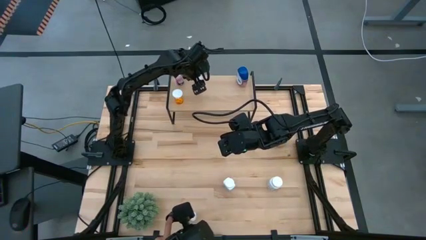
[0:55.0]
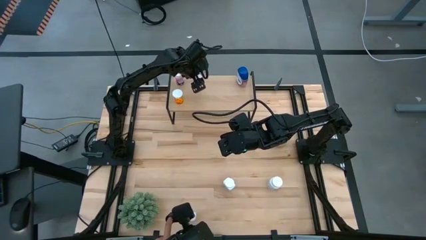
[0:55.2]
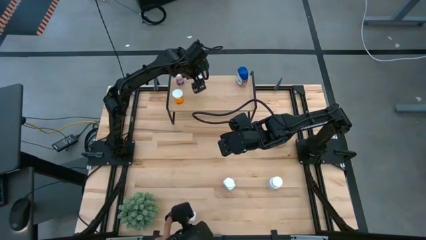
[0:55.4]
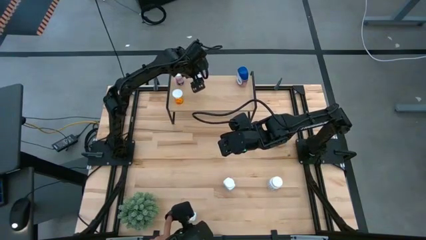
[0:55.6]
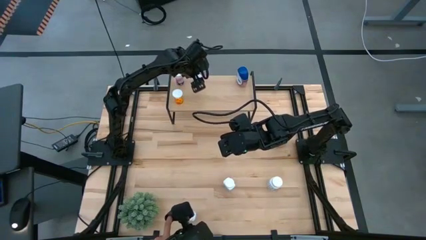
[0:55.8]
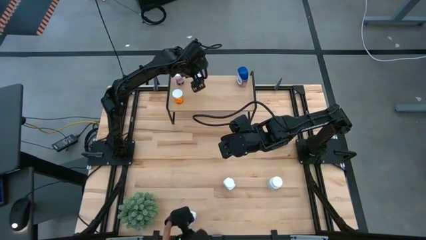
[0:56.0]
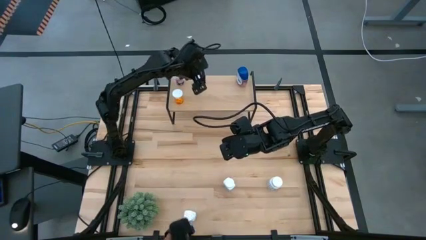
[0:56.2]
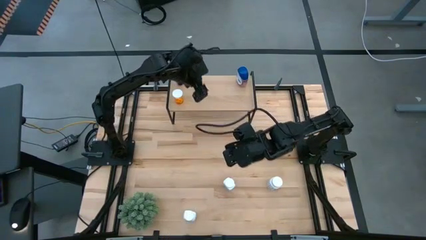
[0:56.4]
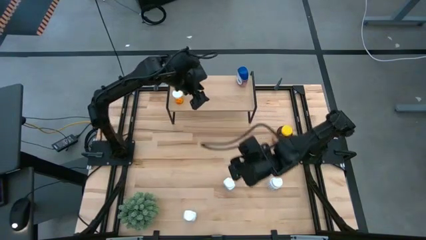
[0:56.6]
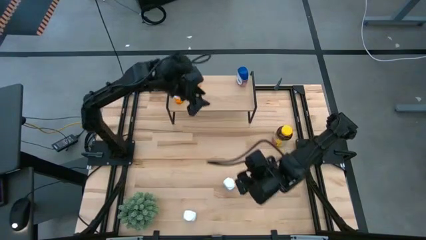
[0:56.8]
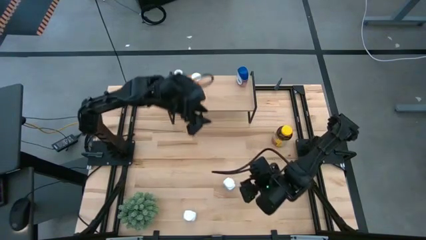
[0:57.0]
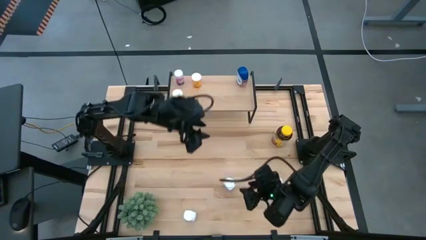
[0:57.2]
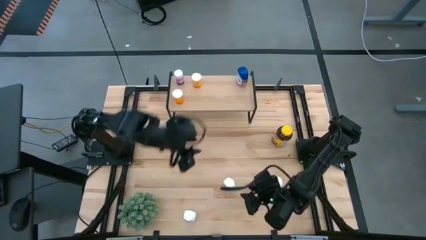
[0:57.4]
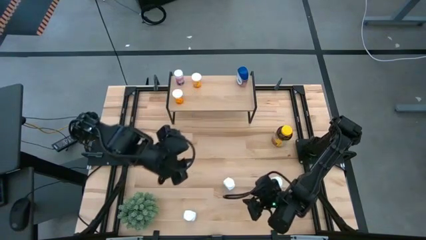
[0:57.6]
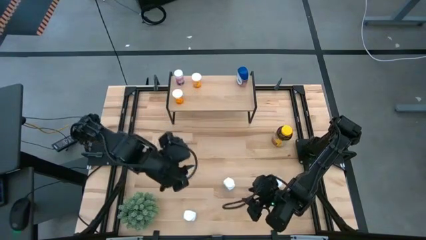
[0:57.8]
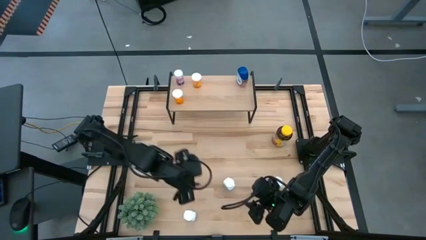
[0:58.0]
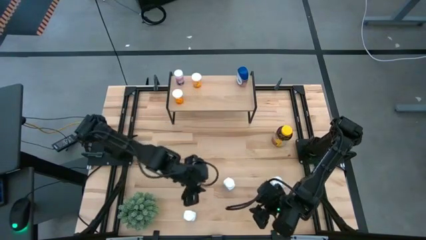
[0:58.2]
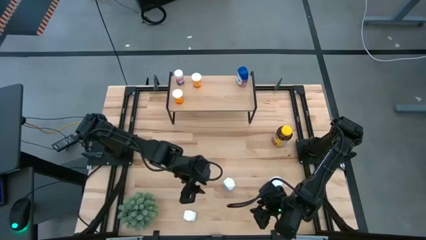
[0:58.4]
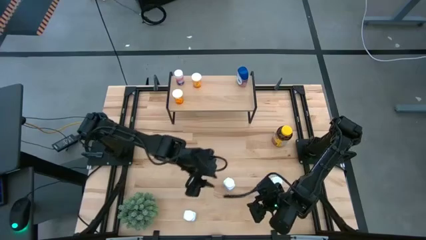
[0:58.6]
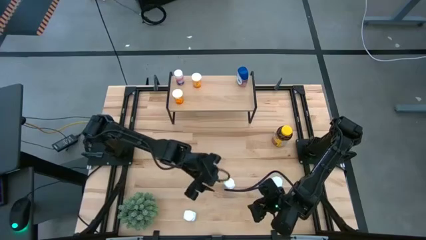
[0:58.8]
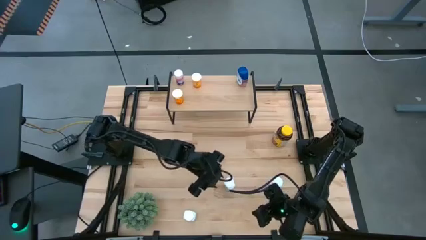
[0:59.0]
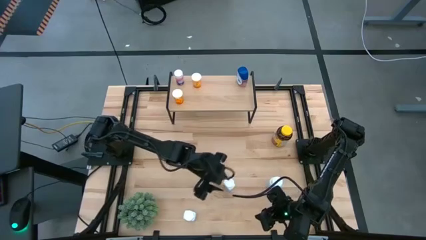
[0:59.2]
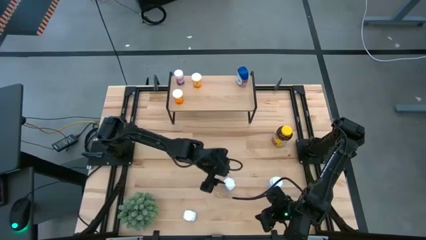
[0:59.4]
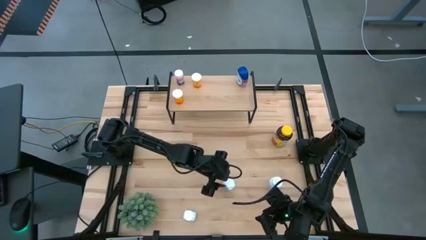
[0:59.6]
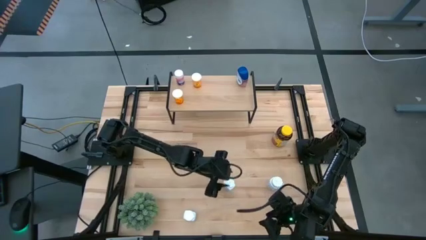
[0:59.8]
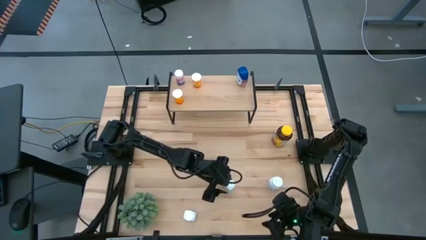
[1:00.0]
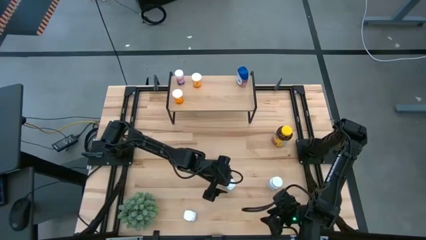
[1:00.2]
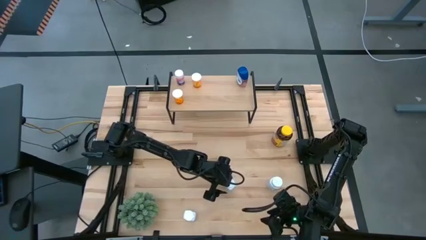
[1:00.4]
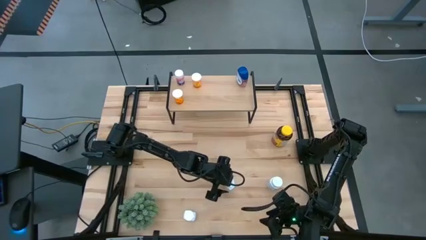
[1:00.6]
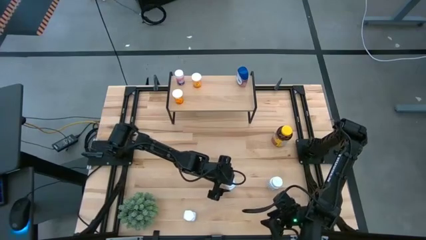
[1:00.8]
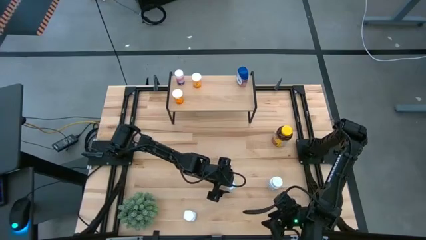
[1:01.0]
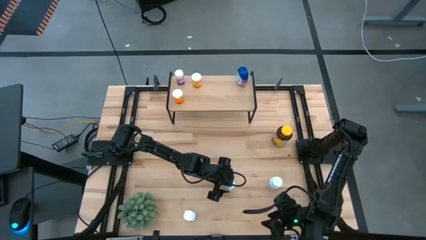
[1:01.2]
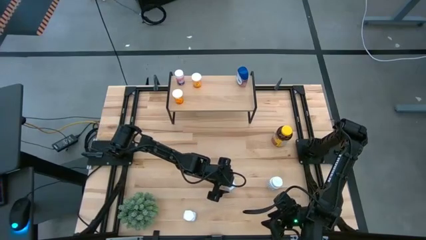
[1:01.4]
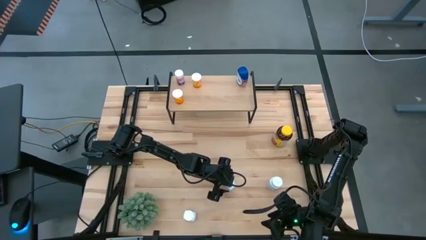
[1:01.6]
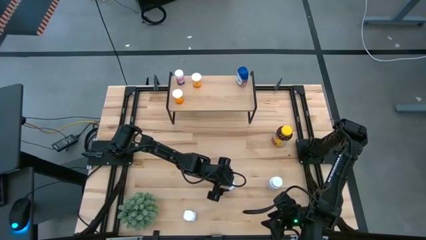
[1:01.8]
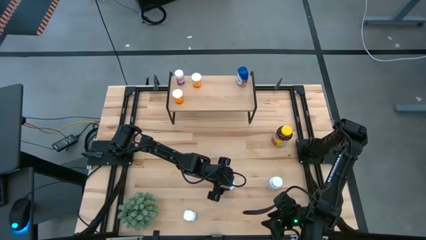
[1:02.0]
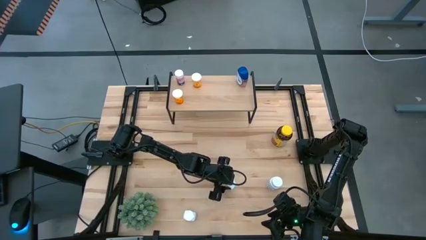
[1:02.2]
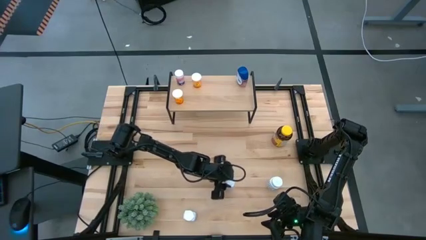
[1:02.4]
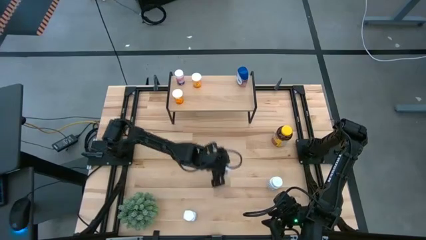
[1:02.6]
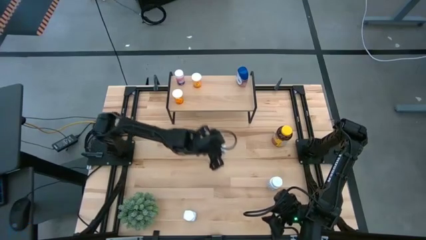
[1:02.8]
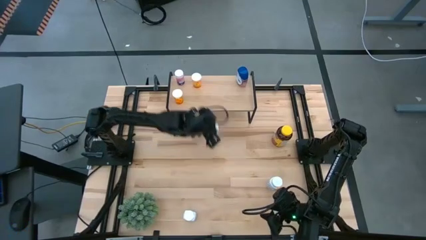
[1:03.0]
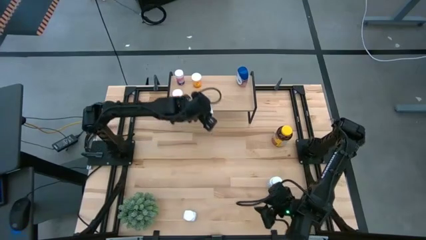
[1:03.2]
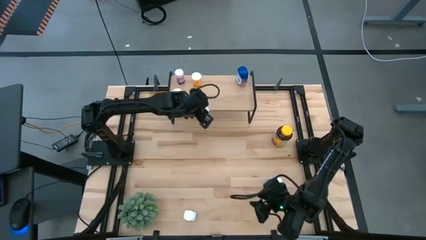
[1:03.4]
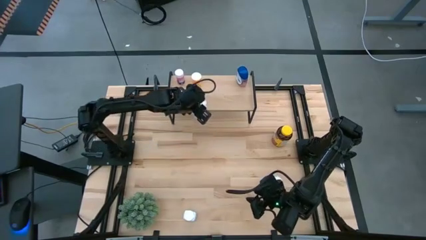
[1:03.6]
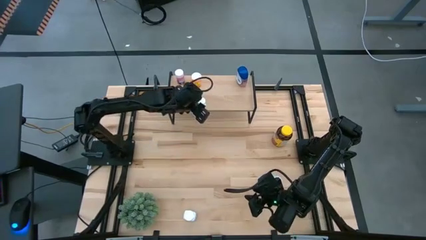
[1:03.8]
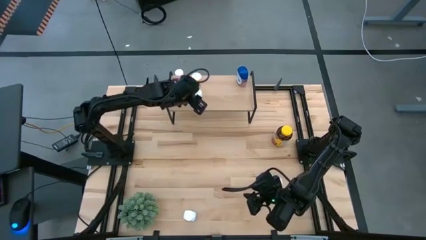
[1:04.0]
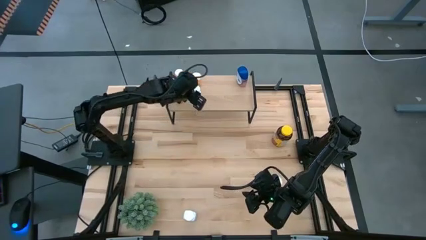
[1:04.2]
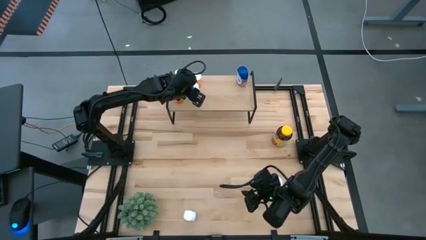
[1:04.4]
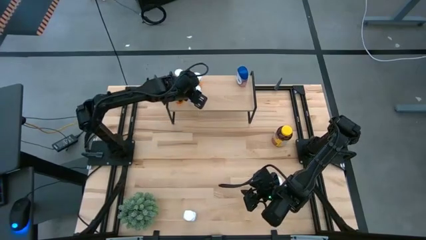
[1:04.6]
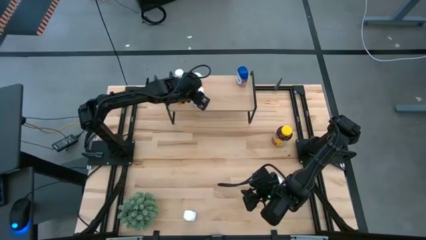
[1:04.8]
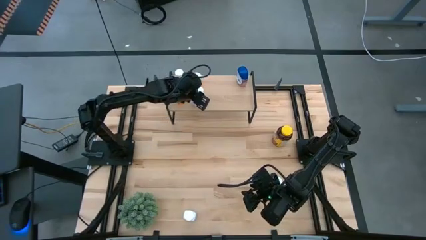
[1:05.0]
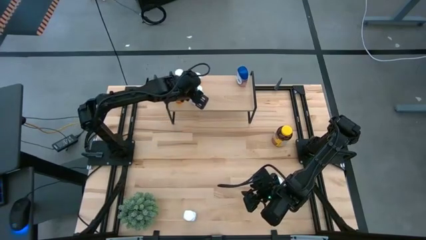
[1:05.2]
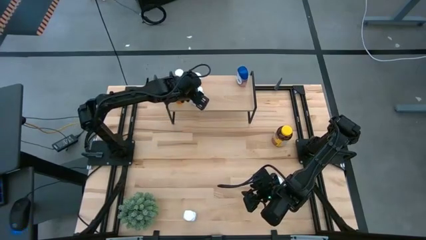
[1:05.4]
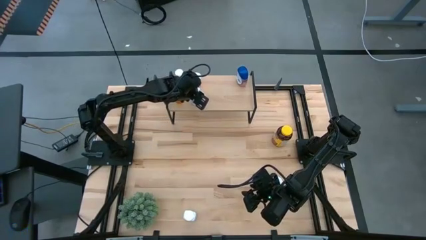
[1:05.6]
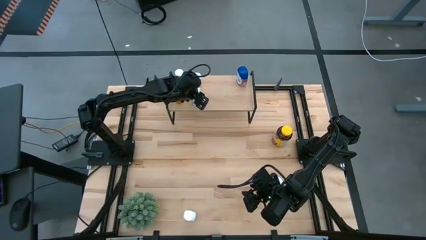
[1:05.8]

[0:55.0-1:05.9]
Task: Pick and place medicine bottles onto shelf by color
Put the top left white medicine bottle on the shelf
